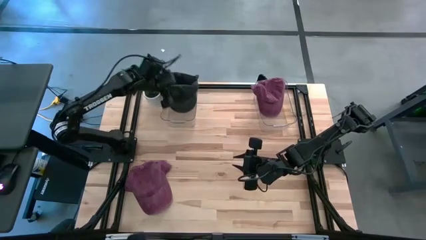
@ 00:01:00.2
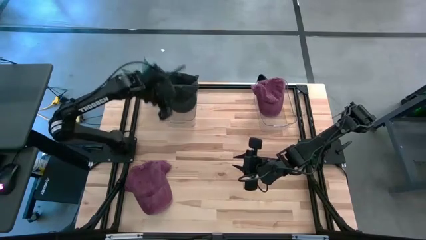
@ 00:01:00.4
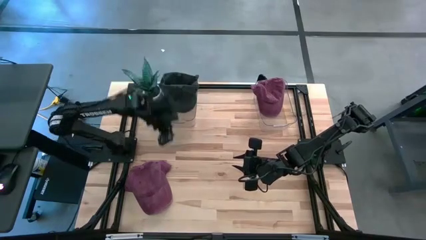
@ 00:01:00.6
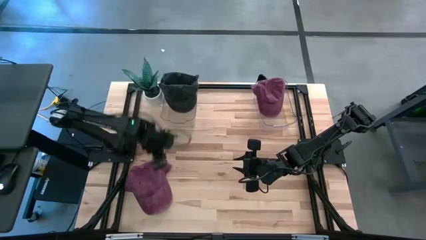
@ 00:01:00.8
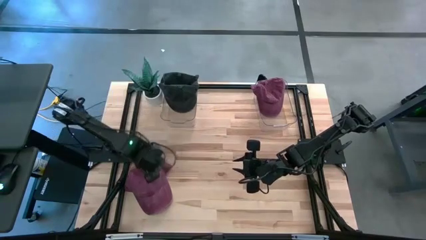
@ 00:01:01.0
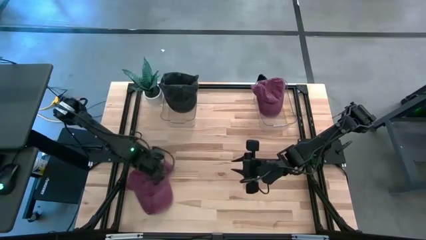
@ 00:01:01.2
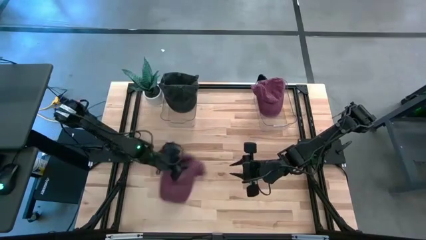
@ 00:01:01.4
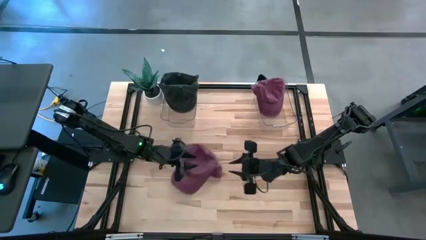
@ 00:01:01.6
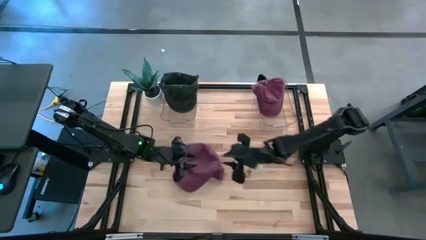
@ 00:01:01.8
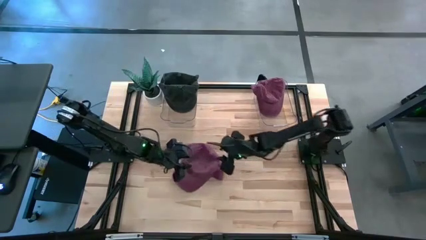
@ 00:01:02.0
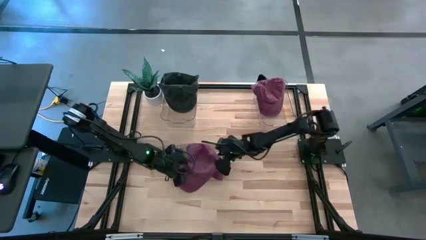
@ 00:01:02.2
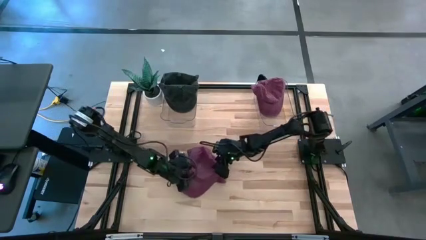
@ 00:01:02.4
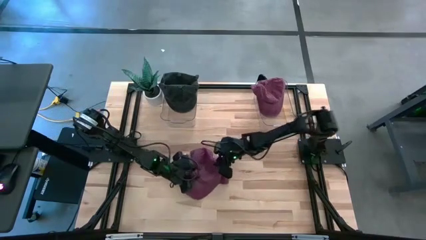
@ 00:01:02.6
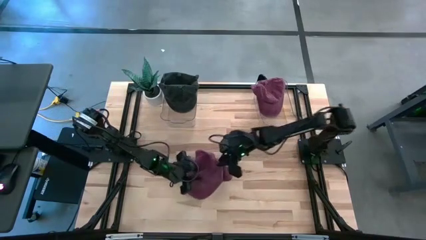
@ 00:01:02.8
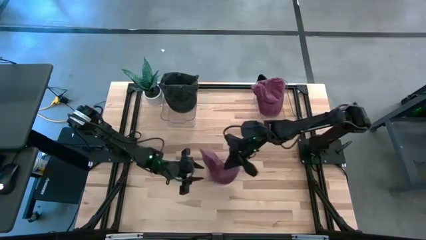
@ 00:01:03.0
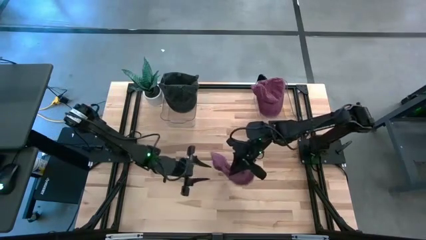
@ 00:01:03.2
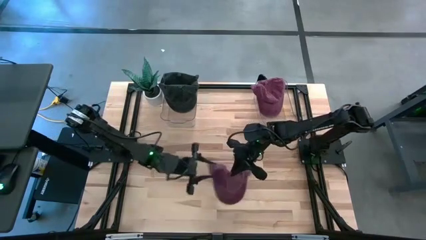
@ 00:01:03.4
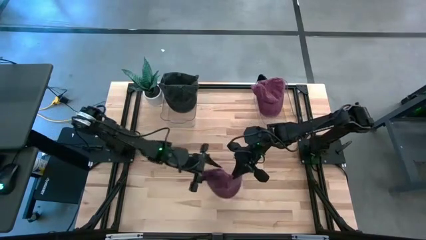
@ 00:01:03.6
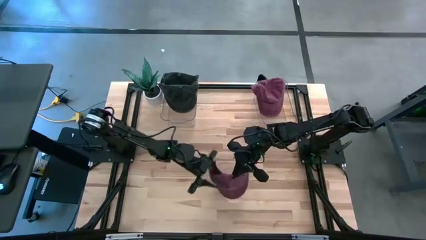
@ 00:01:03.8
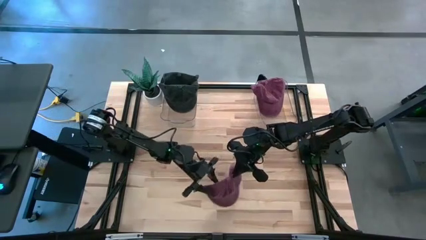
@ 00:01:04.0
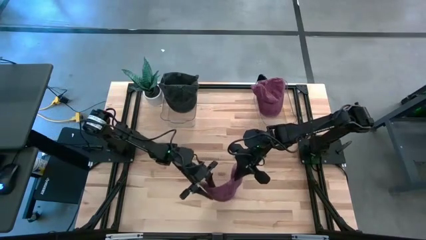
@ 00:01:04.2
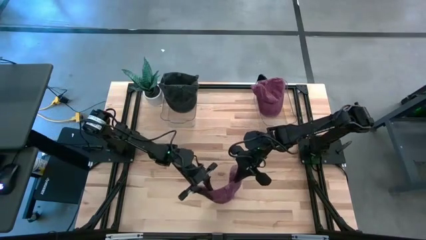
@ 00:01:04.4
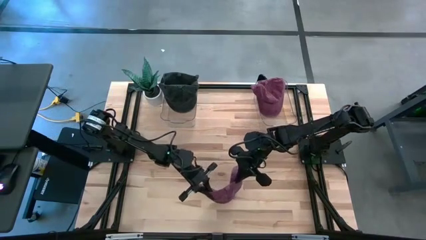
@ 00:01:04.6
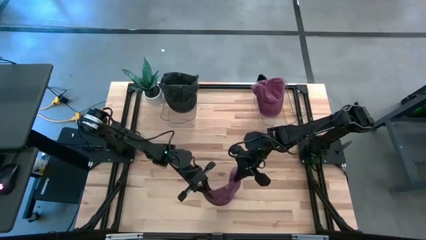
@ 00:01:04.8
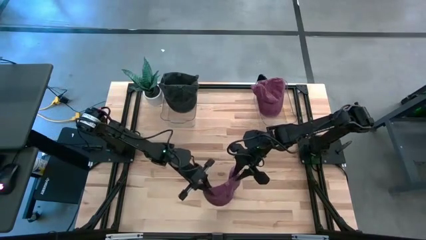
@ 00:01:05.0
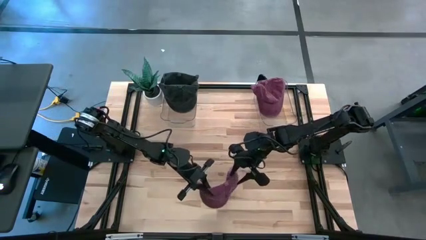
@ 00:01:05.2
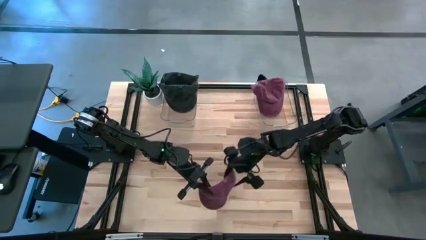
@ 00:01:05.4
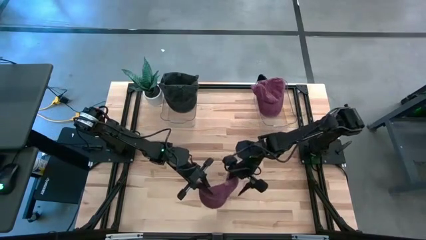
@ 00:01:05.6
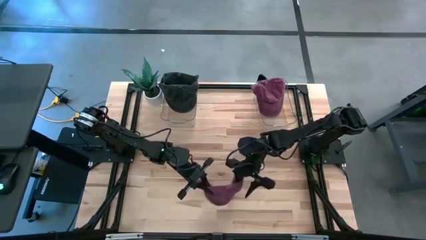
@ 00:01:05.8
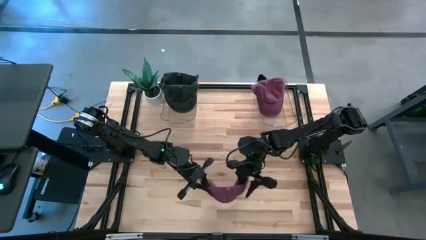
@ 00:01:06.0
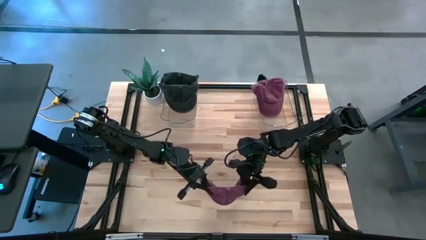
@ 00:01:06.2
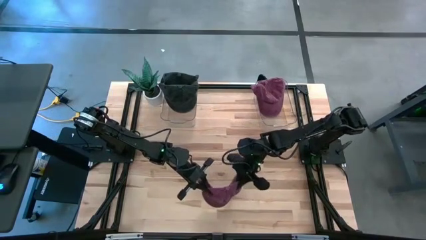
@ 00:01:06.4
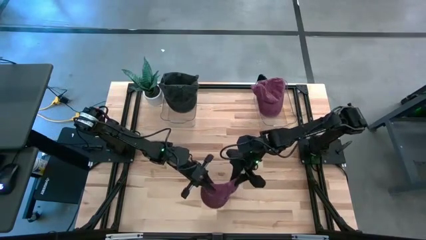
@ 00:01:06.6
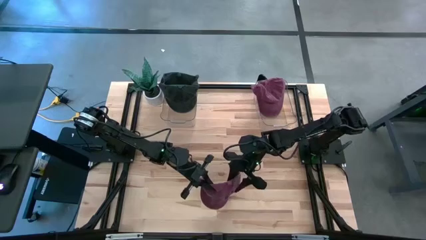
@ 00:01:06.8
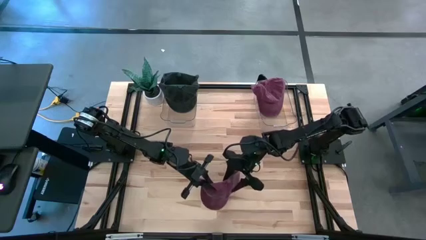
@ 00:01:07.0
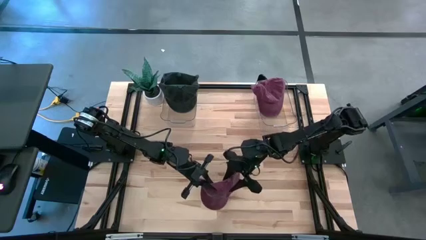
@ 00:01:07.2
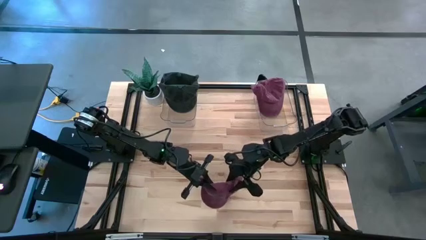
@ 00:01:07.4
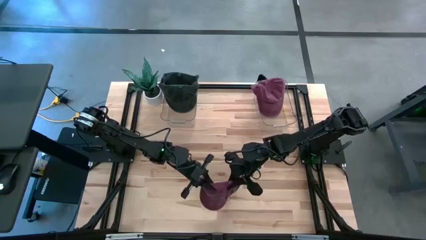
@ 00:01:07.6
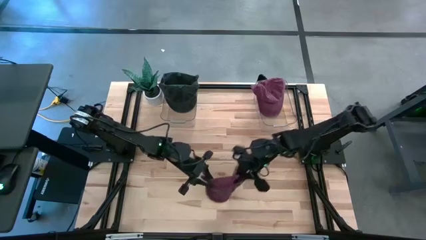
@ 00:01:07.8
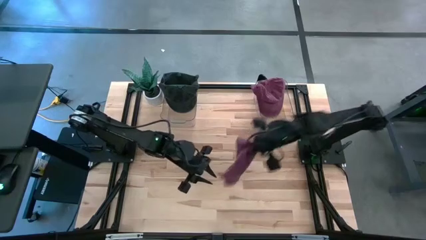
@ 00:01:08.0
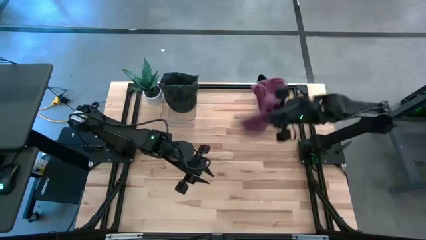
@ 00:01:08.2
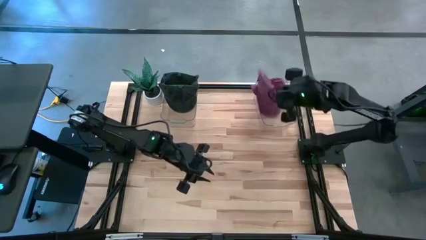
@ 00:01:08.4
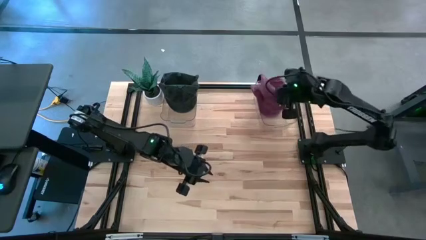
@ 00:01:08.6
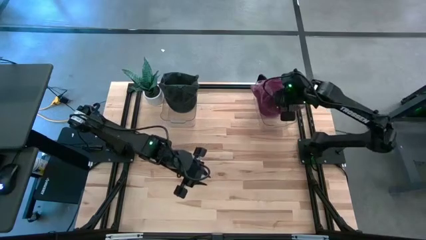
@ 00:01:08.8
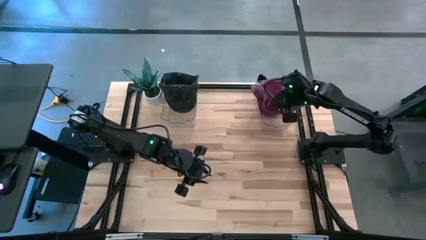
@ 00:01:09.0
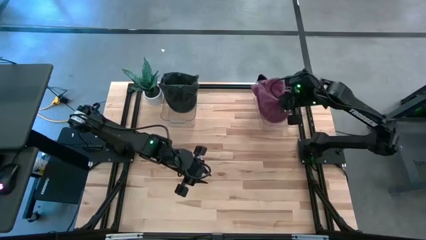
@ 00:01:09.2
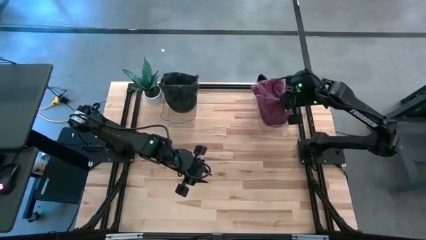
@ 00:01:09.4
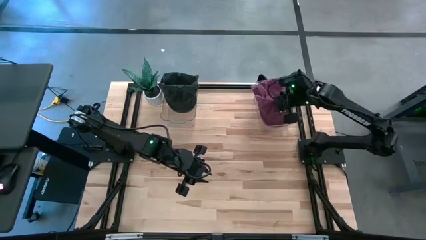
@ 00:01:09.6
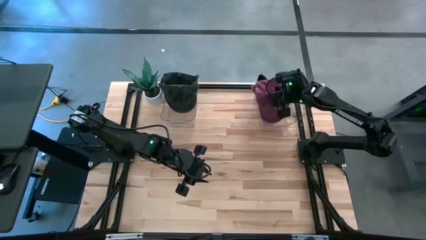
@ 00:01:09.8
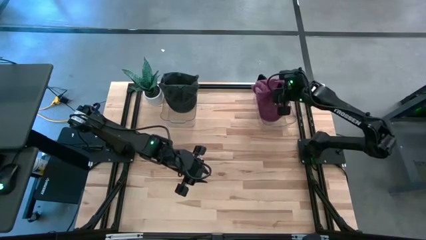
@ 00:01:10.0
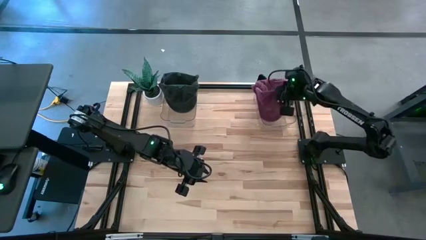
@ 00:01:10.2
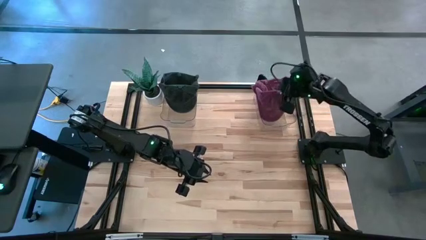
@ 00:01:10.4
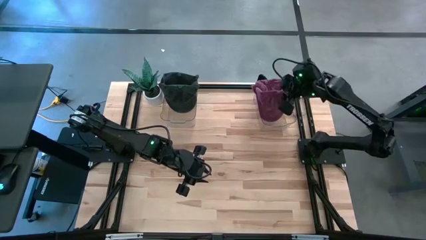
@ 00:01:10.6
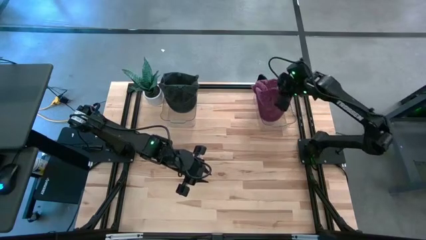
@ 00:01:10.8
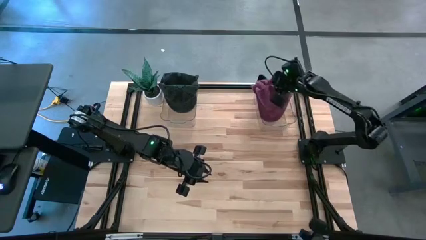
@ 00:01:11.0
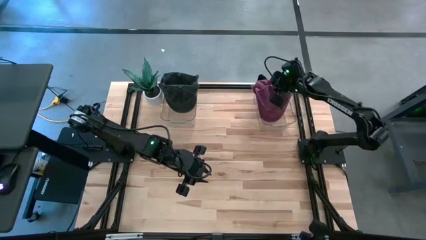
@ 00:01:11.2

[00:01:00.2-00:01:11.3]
Task: Pick & Place hat
Put the red cap into the right transparent bin

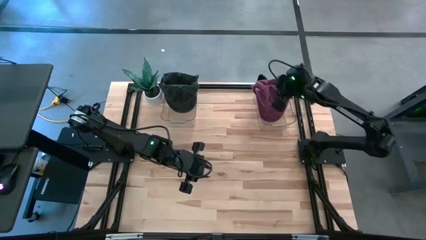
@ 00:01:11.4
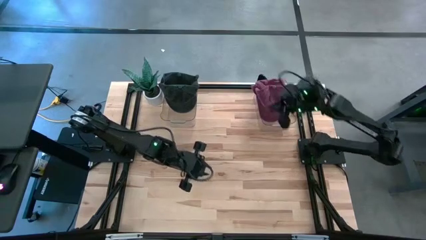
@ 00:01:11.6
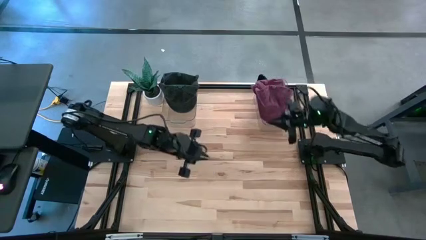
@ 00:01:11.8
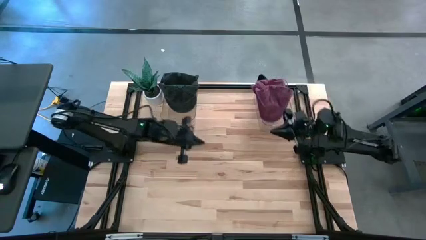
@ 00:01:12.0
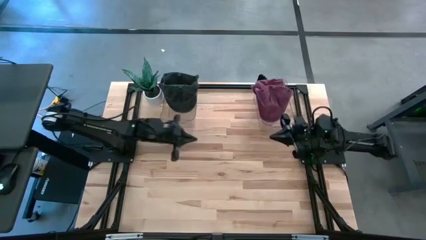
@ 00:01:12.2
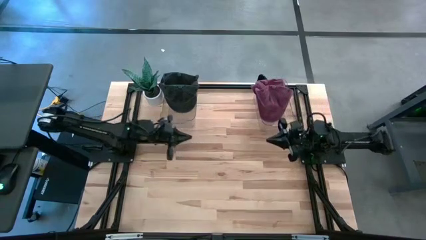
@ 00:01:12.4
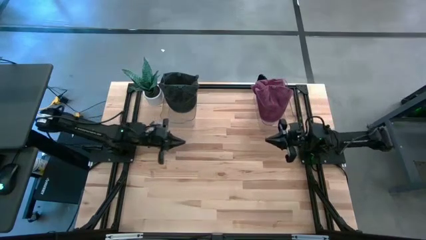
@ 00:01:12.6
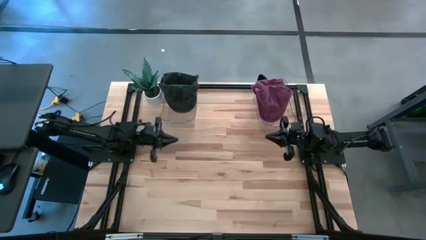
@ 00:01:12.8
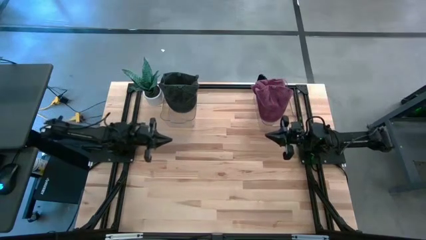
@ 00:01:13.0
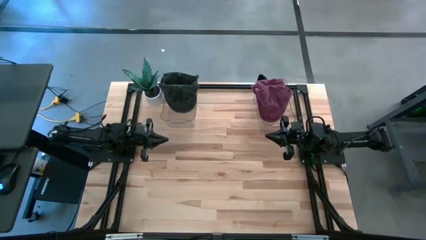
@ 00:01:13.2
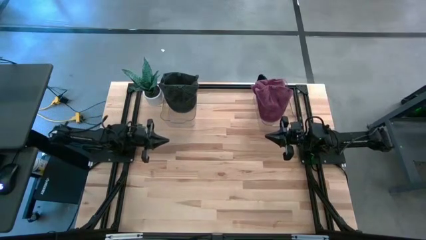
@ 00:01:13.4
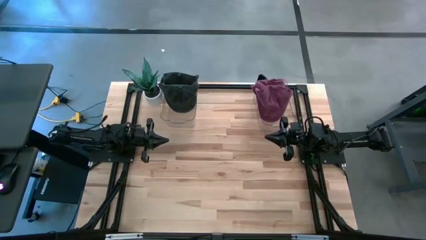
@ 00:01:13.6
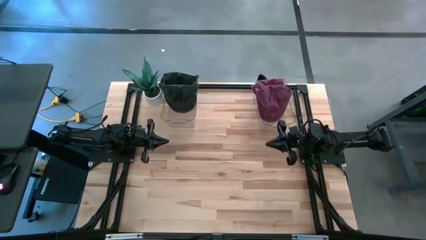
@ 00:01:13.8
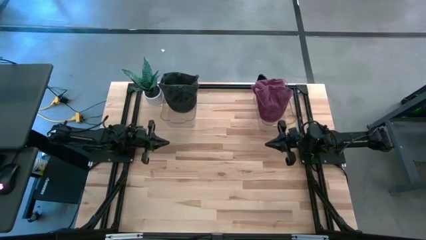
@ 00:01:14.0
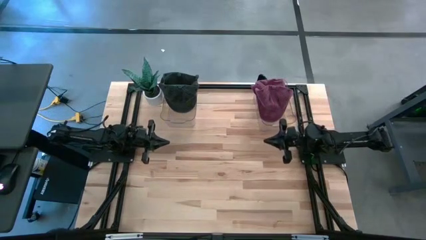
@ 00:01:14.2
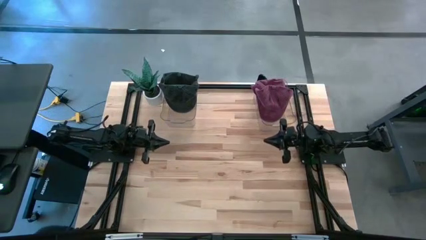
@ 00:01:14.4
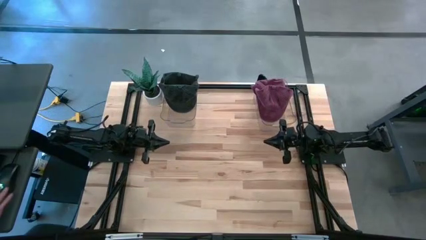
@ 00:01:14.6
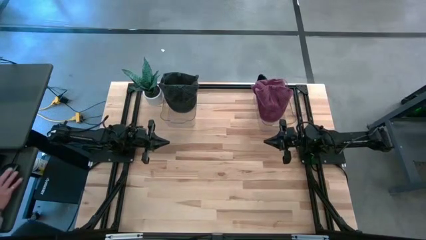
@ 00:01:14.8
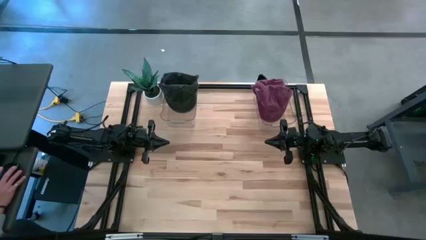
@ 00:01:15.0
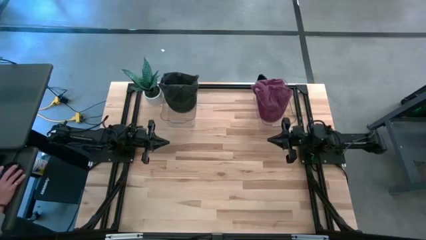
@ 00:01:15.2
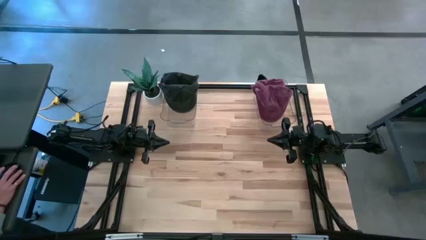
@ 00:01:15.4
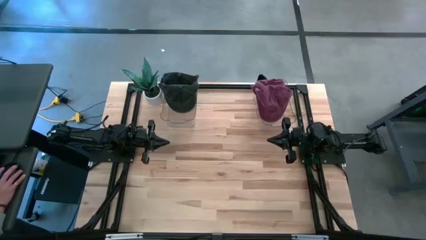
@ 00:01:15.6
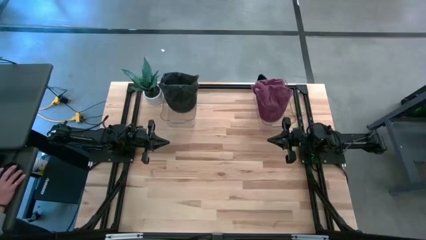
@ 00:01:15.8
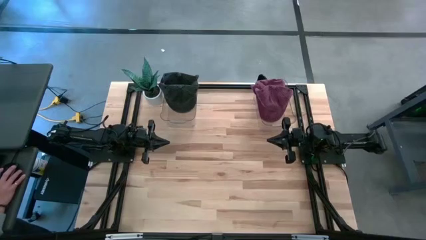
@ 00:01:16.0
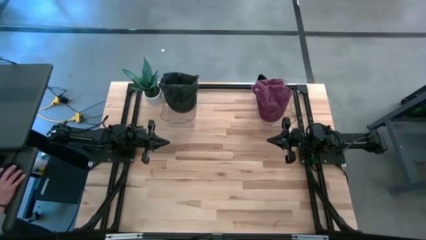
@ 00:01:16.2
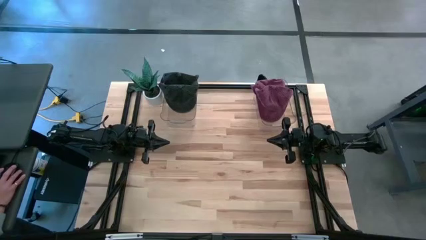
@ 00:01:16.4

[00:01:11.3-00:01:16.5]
Return to Home Position
